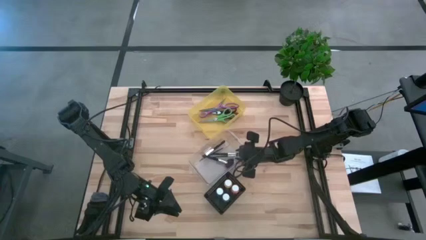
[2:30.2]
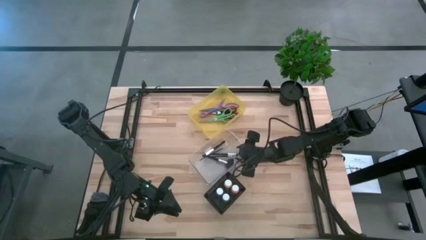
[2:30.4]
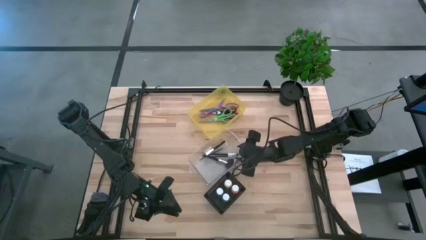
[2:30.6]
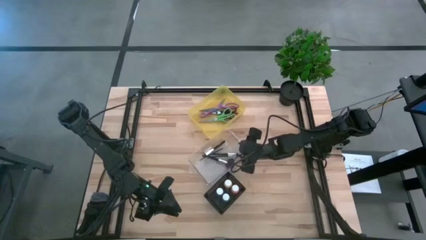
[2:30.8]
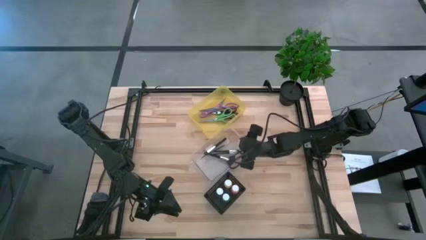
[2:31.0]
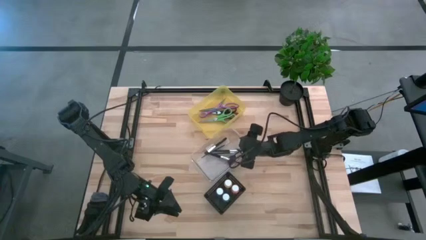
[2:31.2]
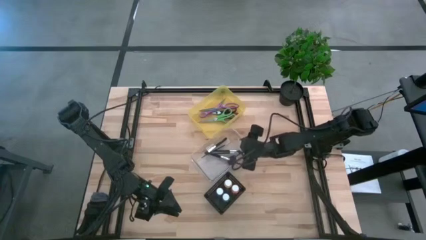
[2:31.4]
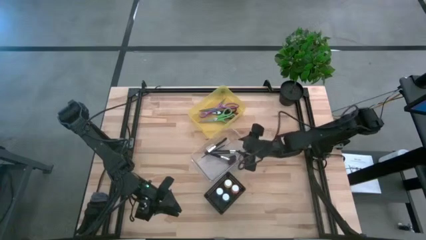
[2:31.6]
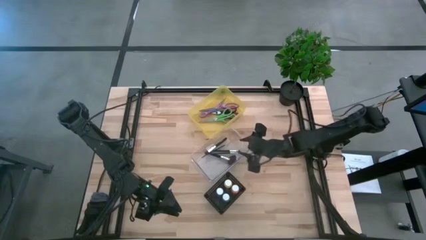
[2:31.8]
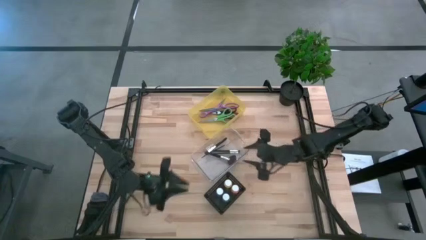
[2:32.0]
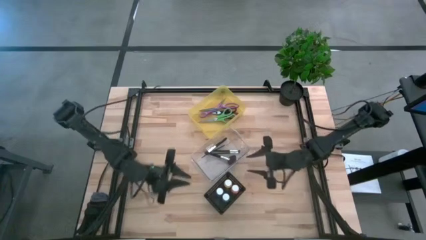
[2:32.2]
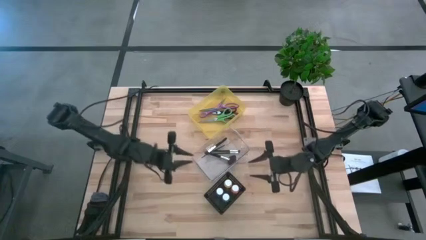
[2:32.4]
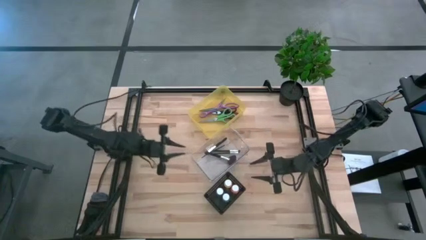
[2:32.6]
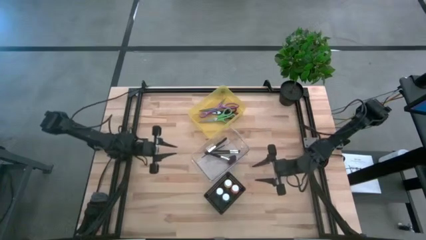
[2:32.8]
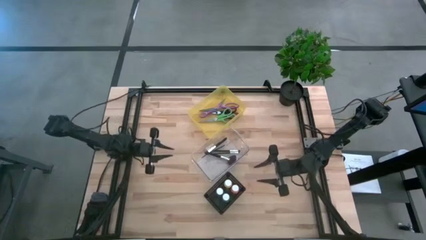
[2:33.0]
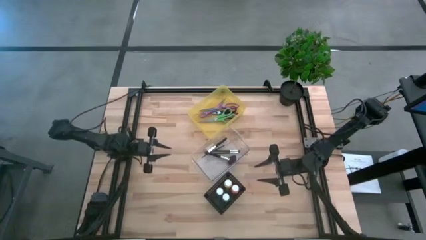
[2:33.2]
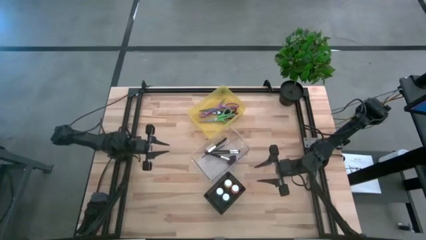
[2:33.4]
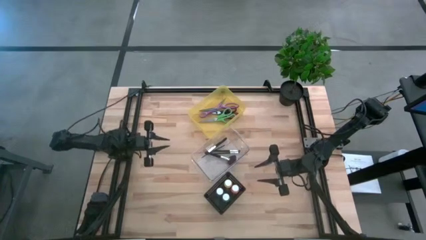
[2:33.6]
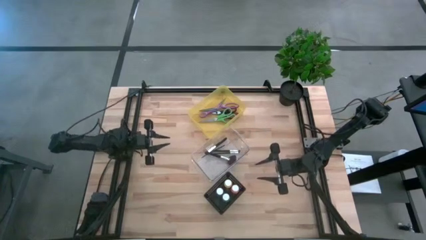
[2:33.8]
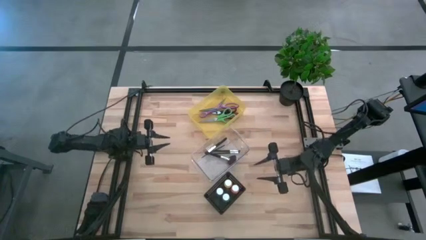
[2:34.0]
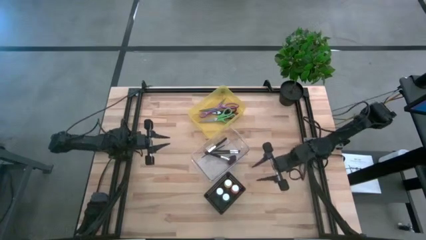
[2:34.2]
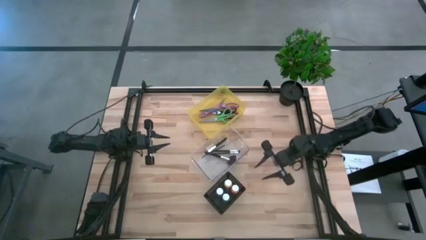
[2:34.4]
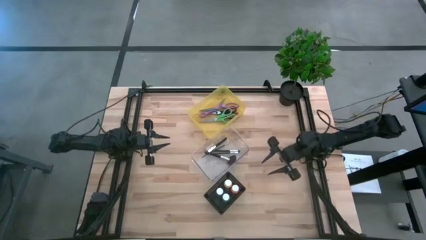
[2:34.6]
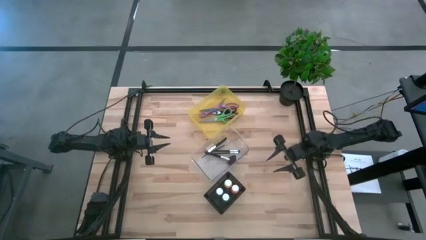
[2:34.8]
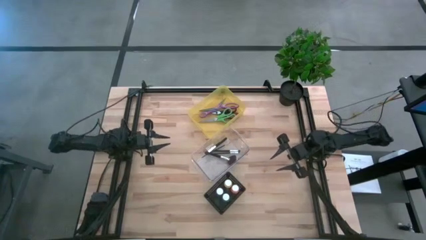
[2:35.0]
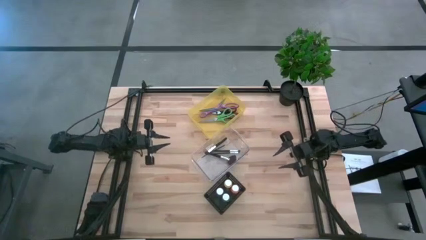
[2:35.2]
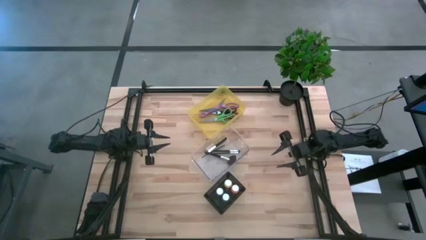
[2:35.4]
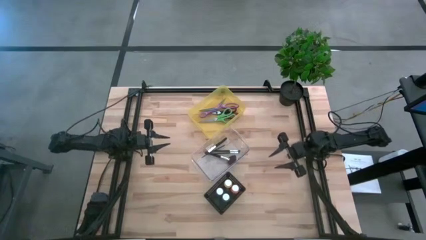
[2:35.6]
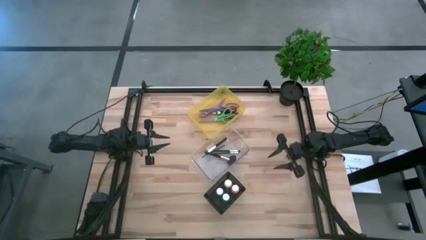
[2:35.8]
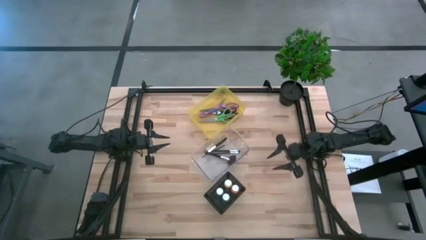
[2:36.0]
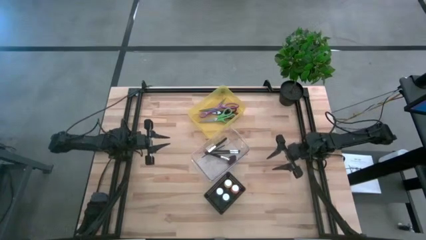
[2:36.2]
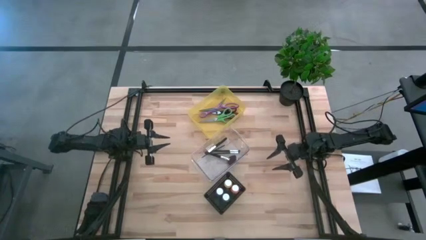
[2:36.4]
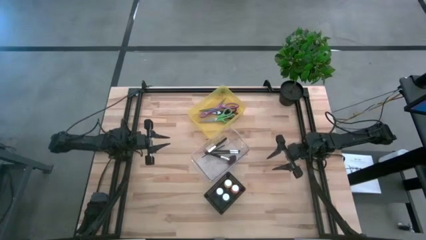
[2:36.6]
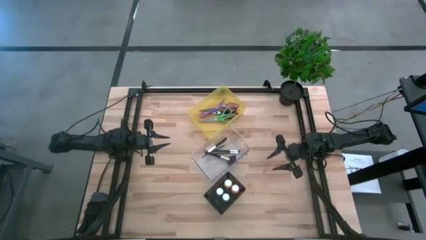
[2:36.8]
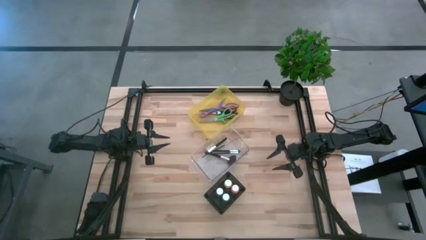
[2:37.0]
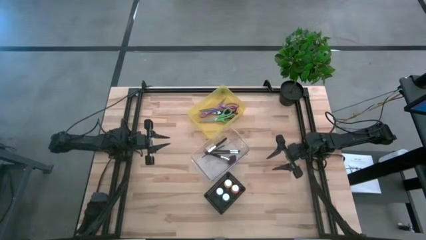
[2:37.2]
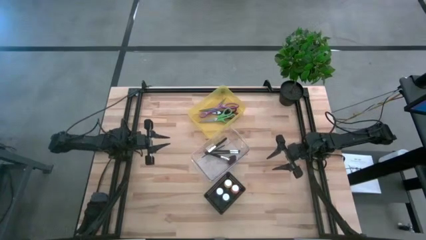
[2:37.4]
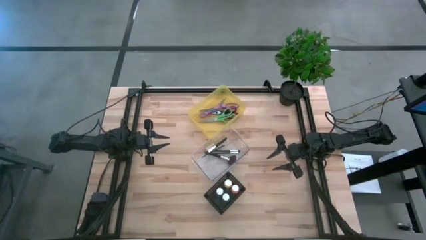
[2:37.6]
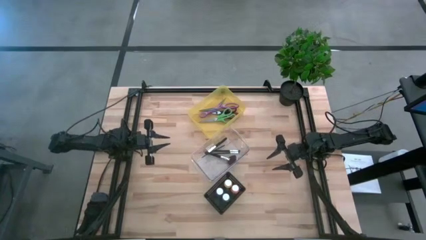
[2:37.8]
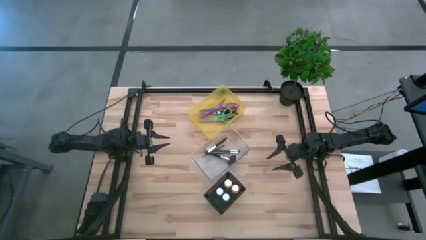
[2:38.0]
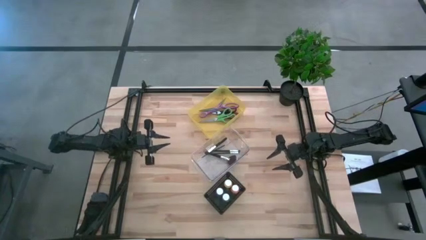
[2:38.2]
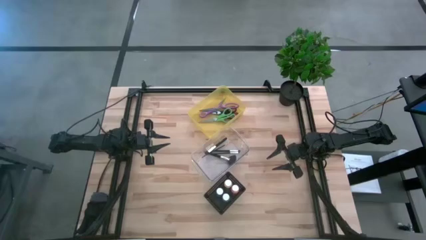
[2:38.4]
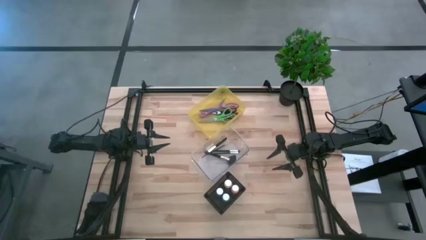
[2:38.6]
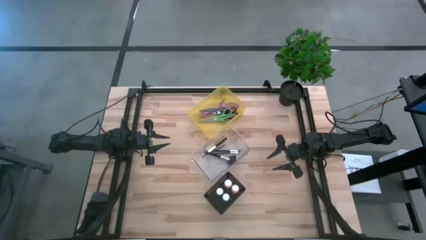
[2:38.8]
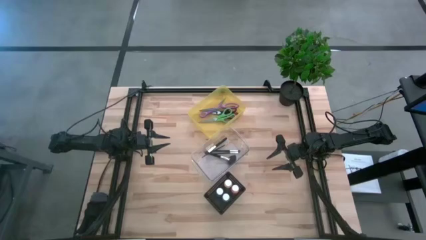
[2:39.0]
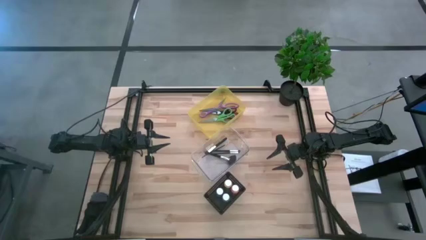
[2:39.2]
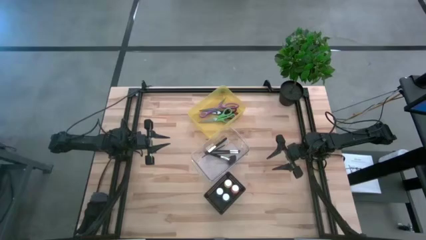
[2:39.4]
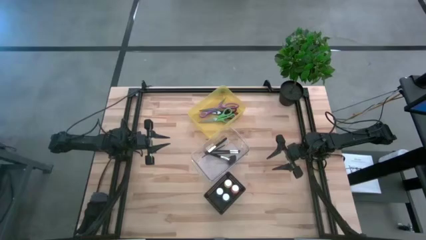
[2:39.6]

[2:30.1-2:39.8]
Task: Pick & Place Paint Supplies
Return to Home Position

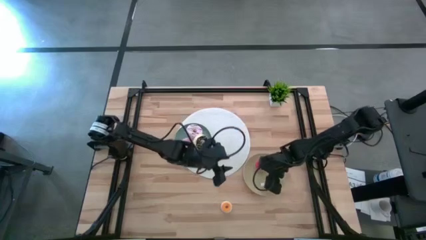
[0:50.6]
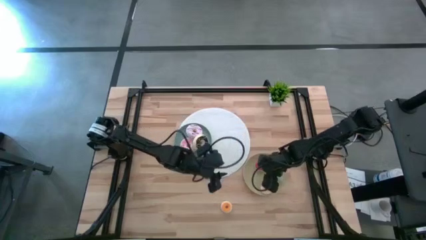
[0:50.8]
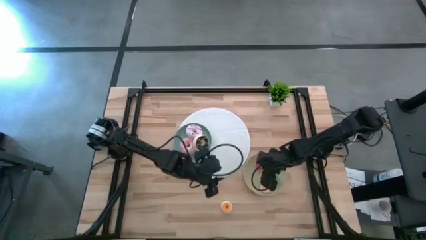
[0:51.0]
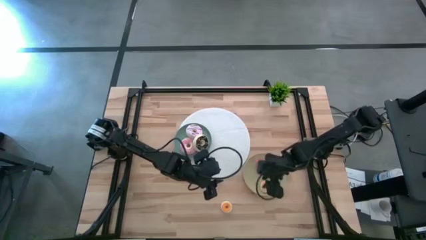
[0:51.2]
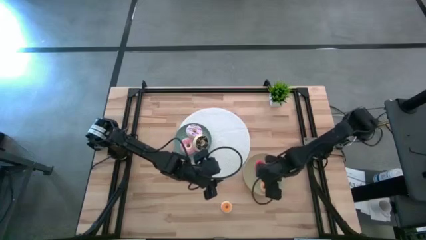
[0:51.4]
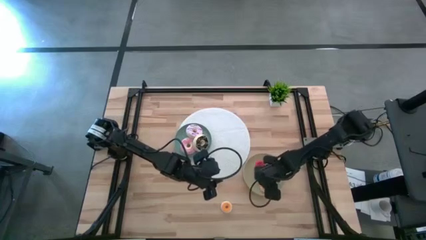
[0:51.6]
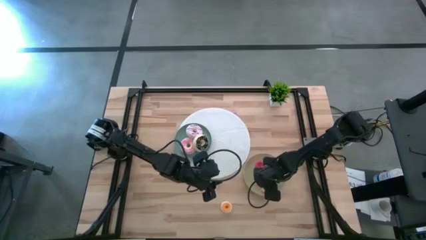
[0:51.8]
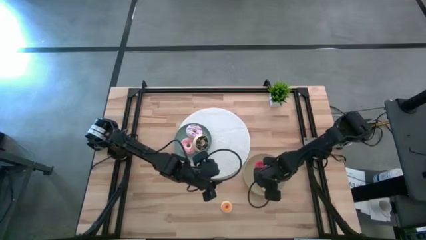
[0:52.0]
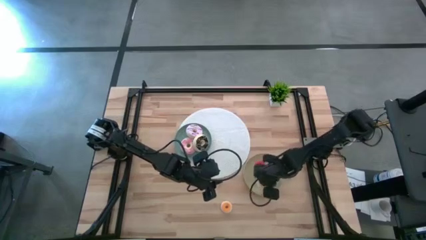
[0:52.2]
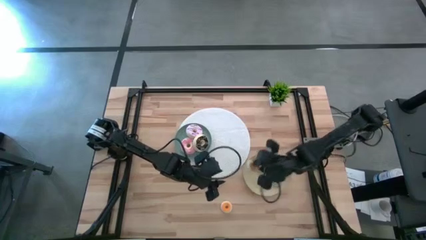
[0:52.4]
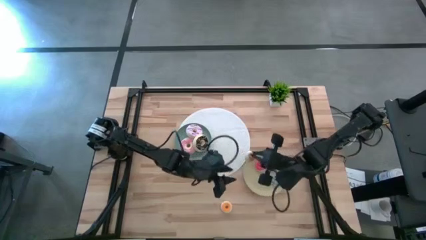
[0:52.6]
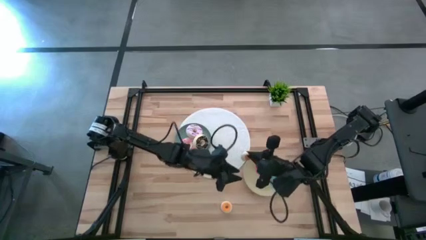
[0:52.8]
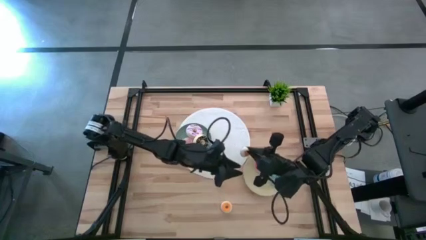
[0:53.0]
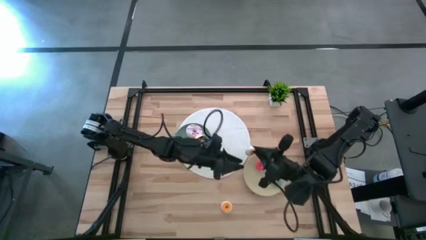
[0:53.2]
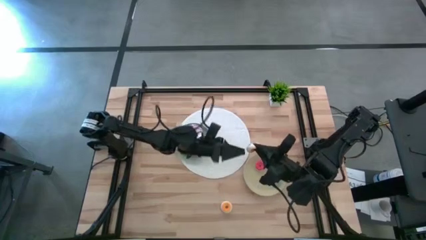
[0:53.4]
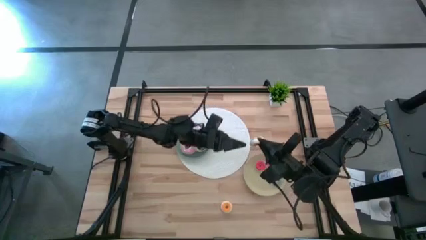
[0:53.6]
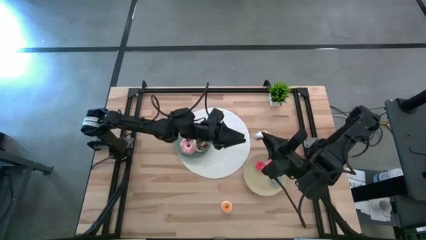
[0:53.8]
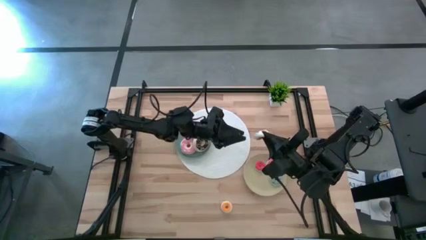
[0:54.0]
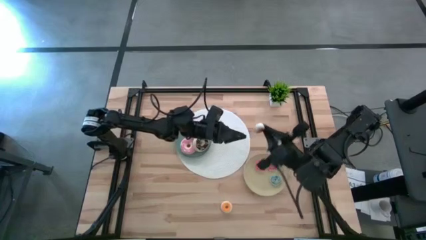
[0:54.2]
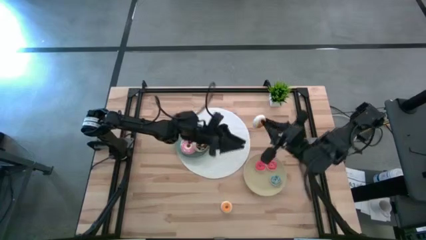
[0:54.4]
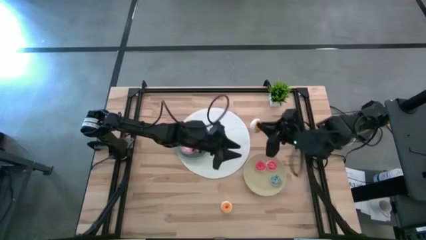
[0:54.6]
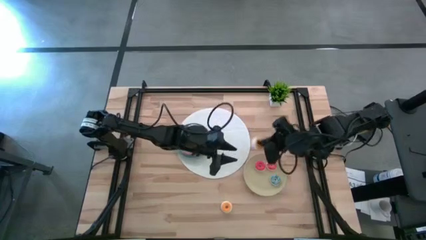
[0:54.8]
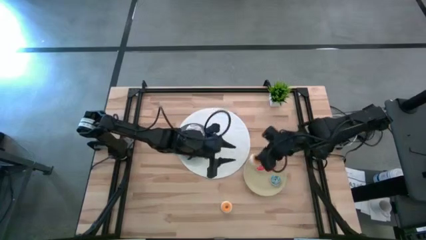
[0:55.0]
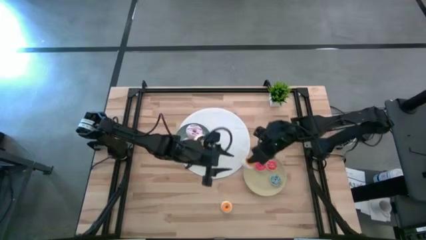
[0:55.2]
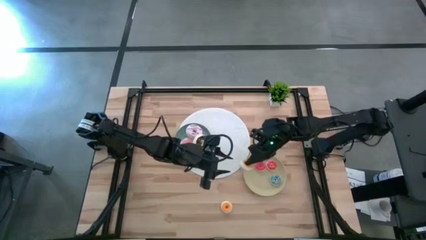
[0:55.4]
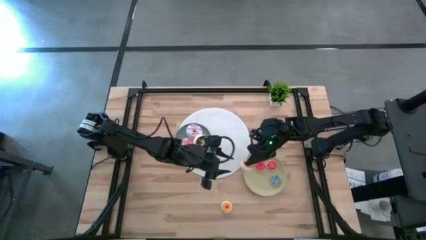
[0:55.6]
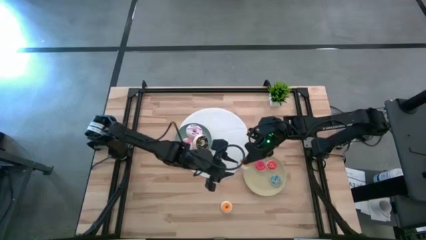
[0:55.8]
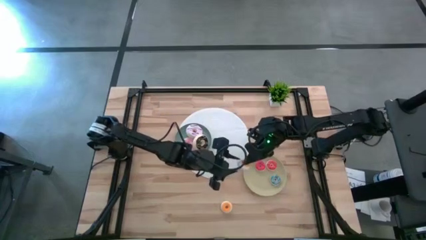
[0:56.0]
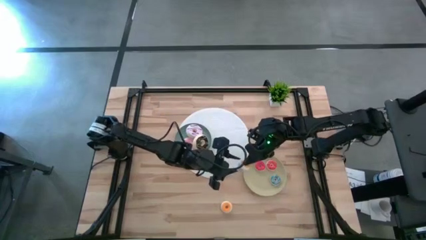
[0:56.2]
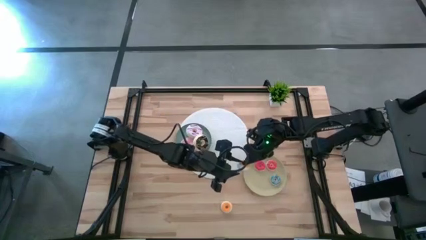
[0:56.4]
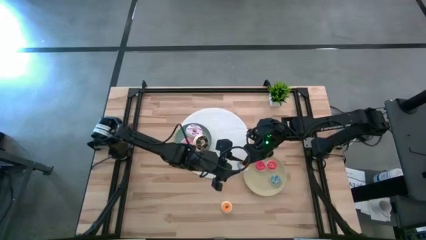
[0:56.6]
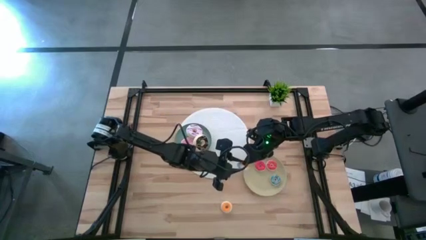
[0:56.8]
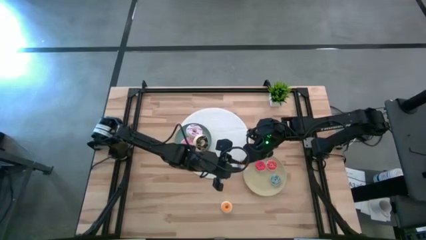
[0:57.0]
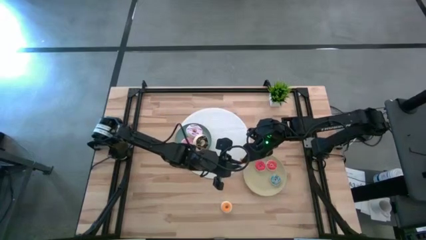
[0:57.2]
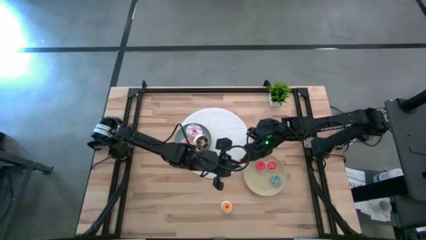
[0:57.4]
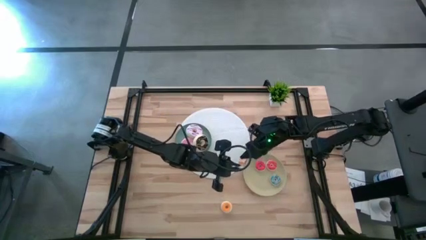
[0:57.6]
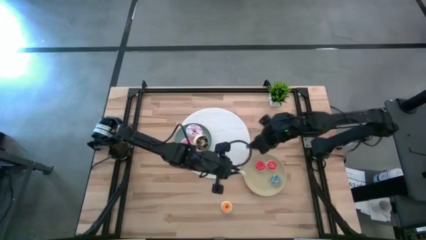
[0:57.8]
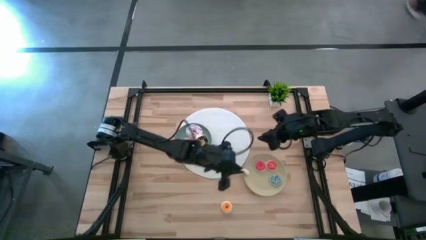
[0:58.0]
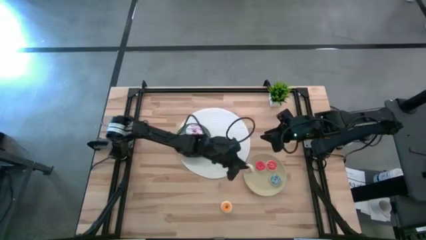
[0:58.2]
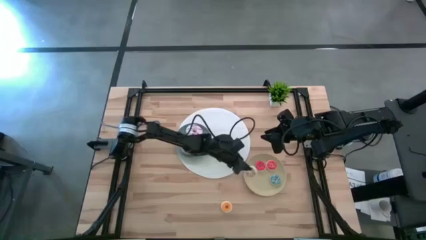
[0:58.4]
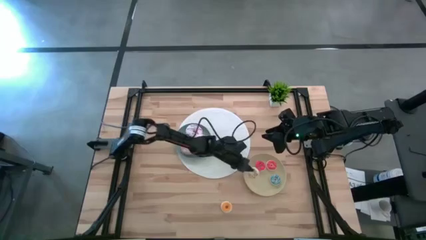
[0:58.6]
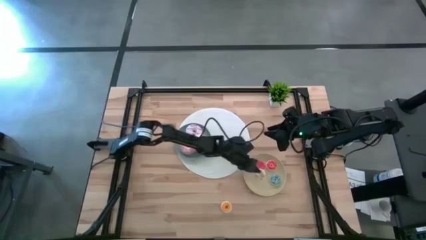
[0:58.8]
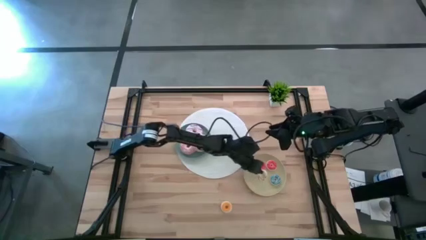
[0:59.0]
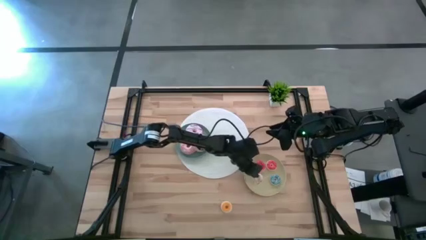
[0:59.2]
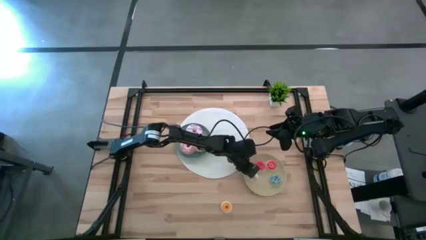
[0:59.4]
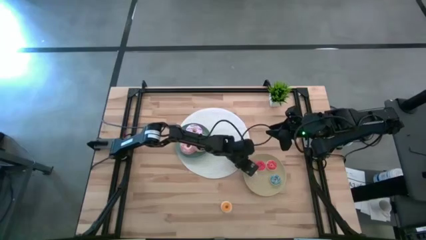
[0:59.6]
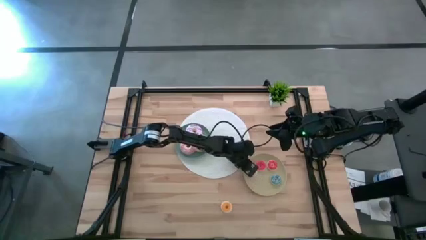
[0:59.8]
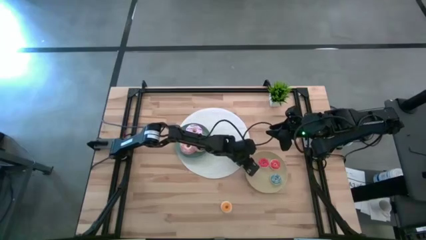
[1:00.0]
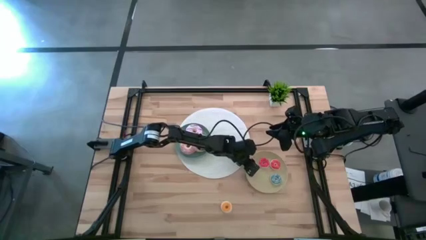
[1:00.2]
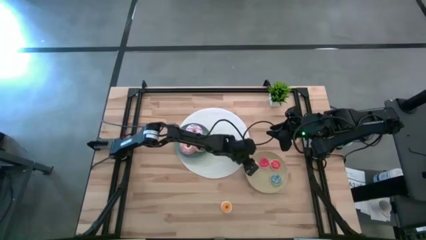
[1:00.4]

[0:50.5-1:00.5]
Task: Pick & Place donuts
Put the small white donut on the brown plate
